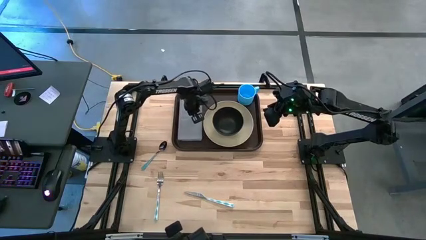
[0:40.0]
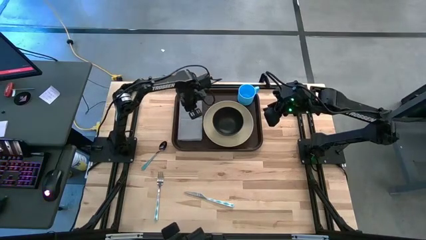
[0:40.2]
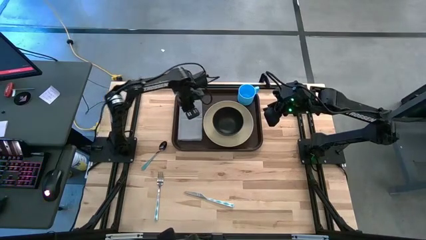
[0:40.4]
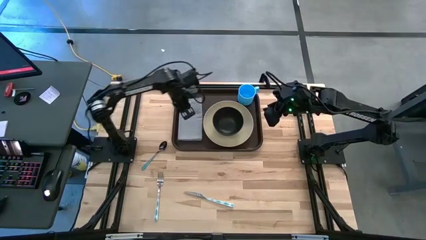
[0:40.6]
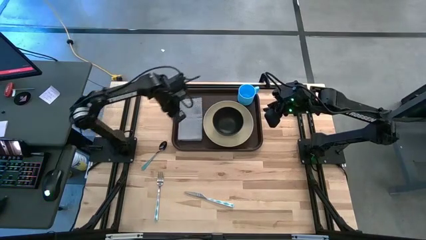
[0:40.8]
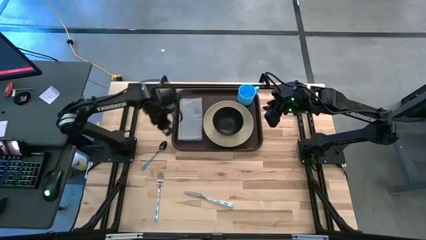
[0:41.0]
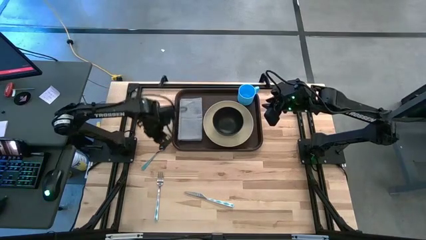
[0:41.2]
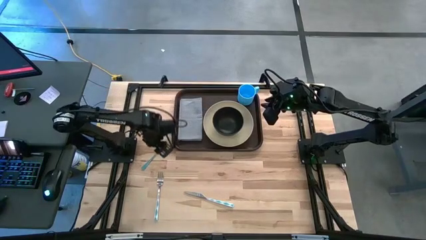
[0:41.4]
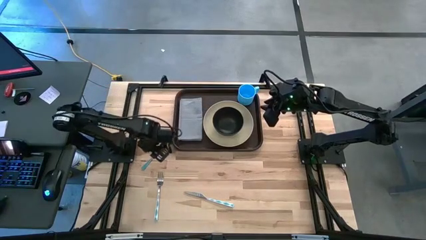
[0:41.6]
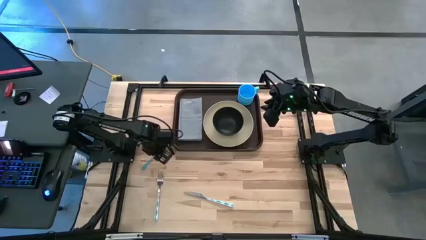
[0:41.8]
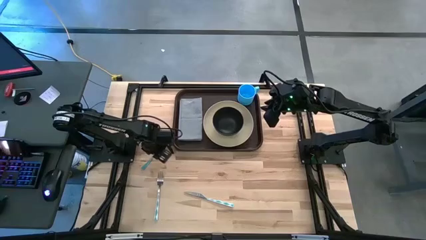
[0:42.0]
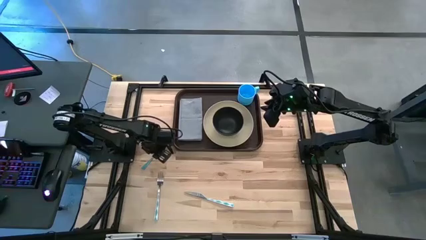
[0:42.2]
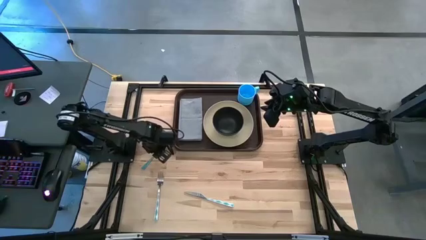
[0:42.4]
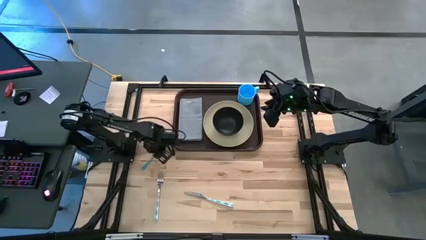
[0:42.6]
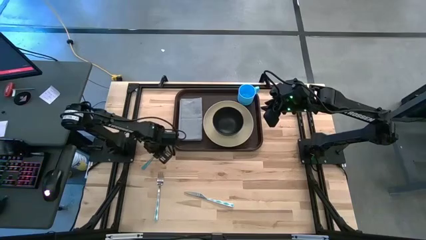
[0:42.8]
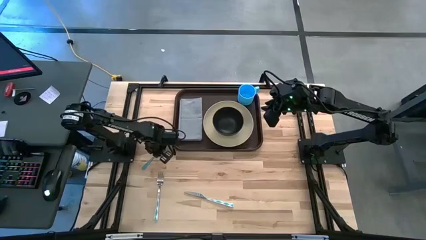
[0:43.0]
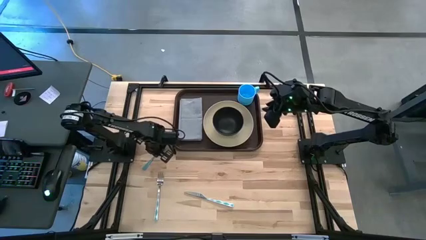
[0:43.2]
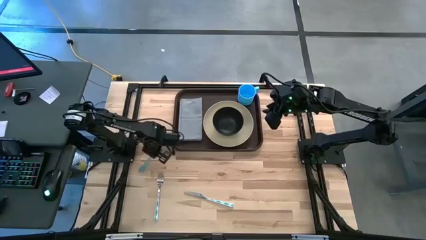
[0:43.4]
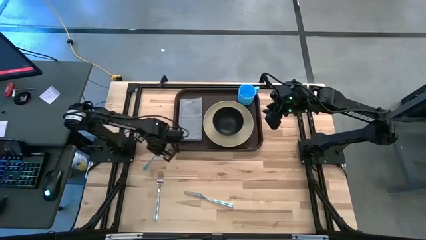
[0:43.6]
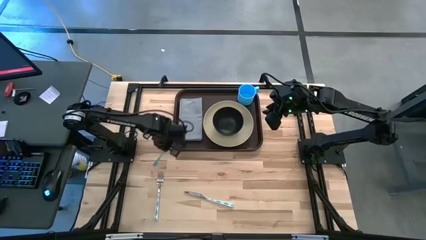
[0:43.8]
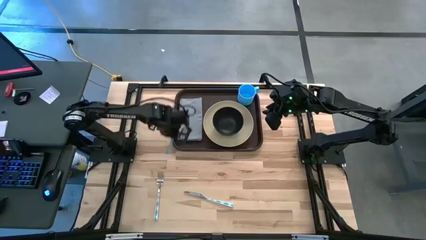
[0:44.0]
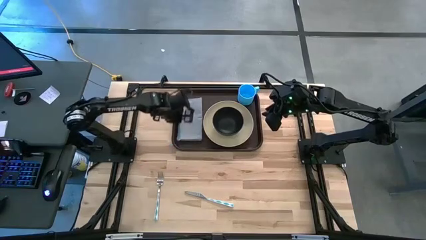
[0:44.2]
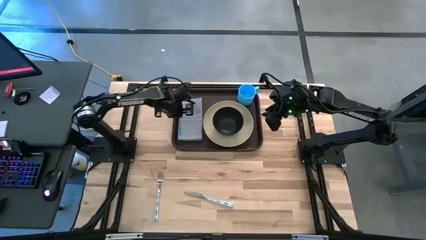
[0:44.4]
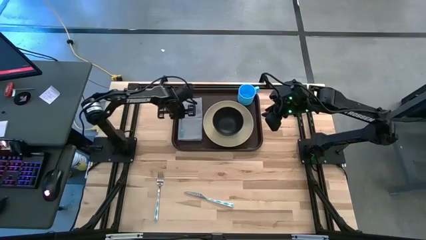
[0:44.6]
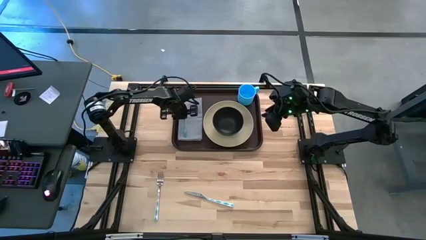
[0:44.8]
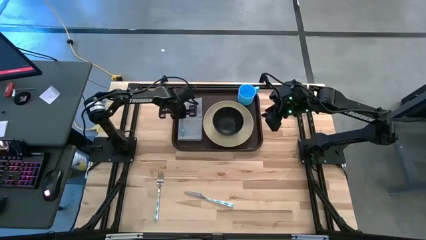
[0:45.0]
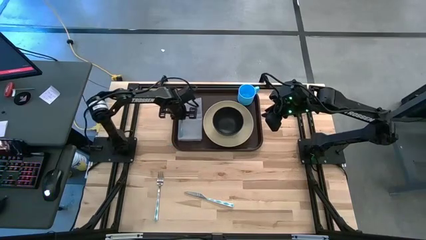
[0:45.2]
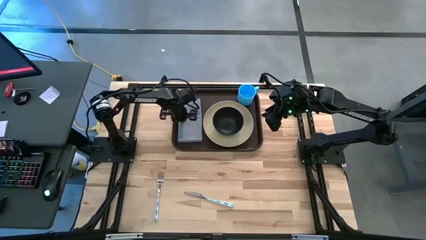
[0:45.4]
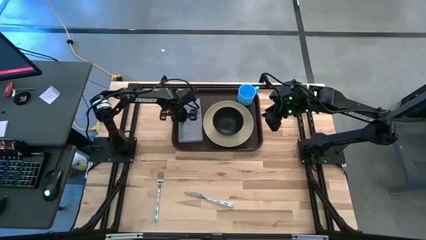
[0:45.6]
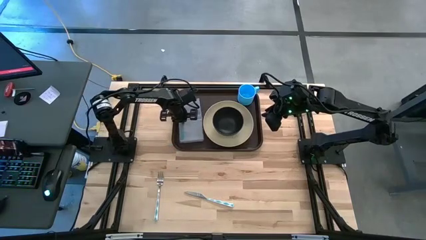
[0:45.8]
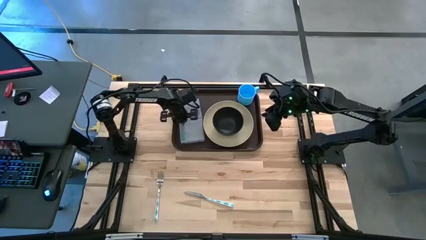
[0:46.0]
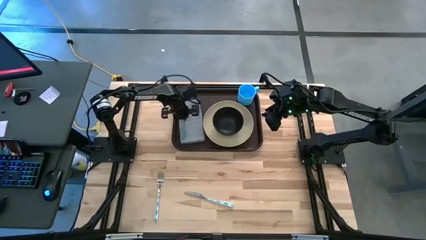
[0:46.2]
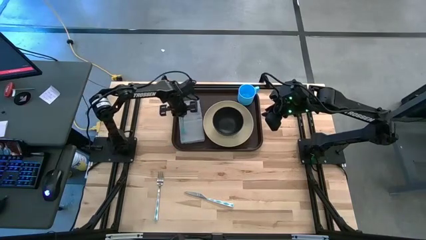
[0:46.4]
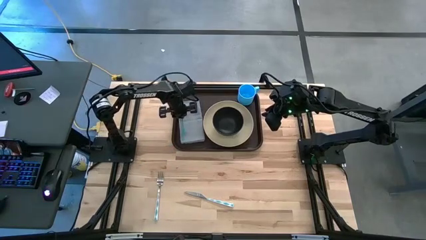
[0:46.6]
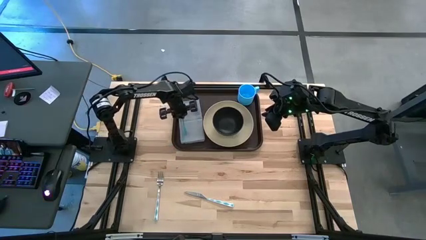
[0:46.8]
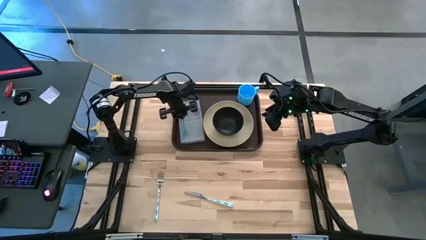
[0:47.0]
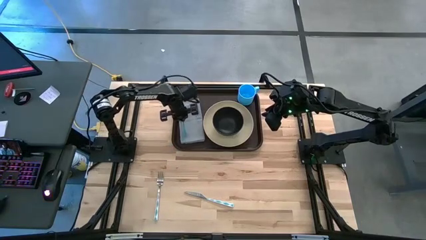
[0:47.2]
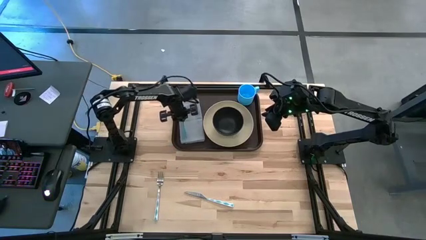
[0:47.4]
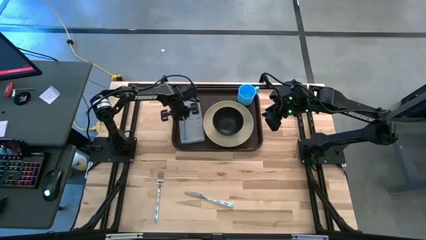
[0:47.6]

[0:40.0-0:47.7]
Task: Set up tray
Put the blue spoon on the gray napkin to the left of the white plate

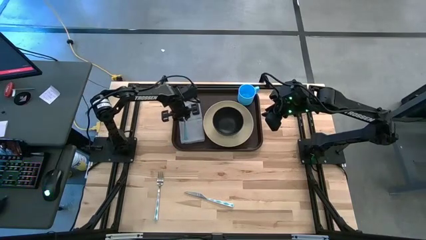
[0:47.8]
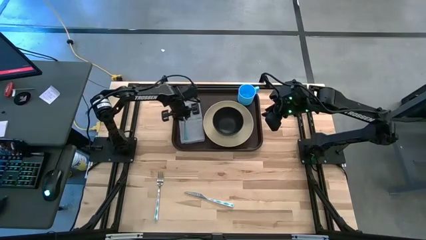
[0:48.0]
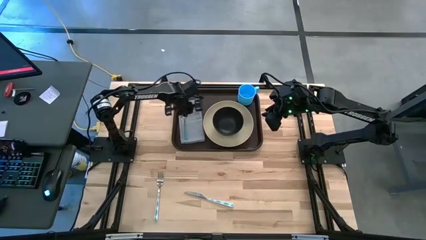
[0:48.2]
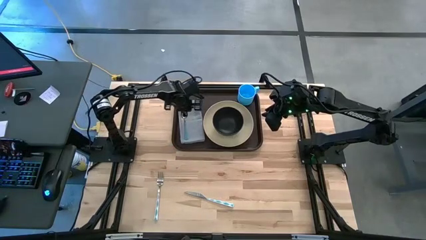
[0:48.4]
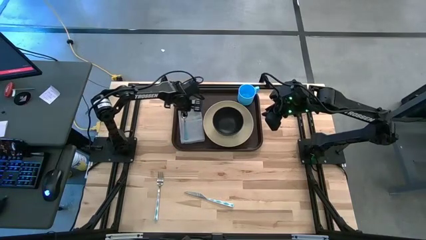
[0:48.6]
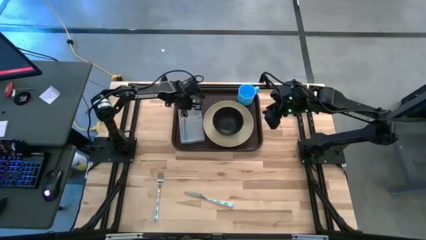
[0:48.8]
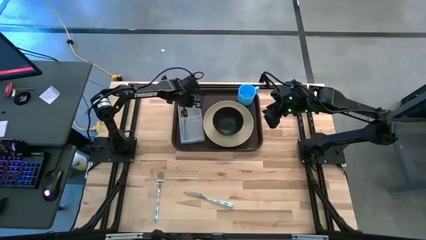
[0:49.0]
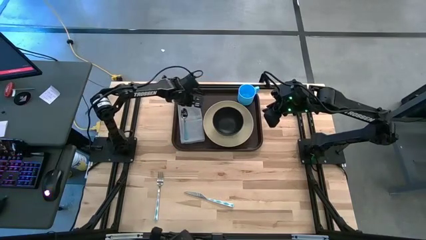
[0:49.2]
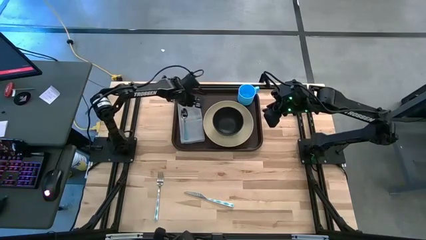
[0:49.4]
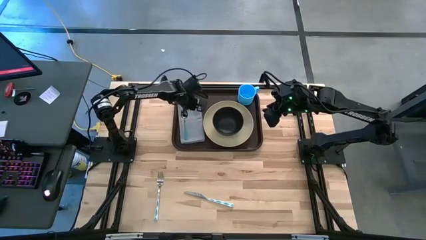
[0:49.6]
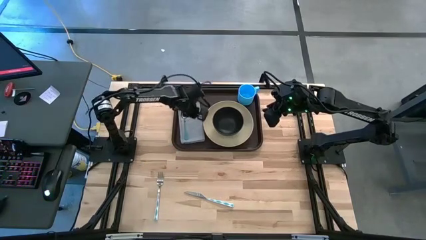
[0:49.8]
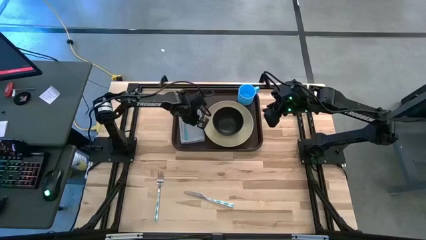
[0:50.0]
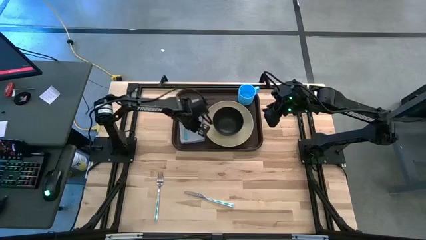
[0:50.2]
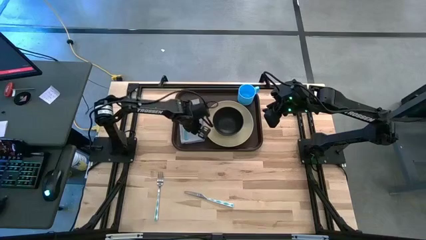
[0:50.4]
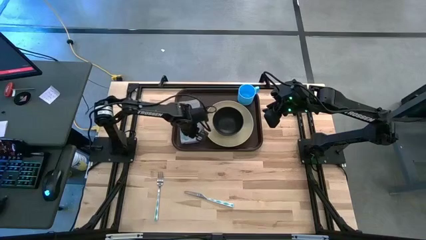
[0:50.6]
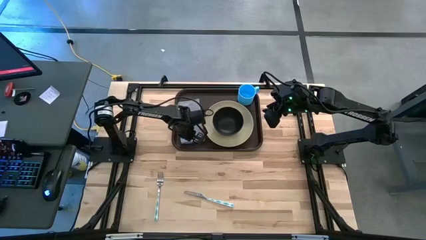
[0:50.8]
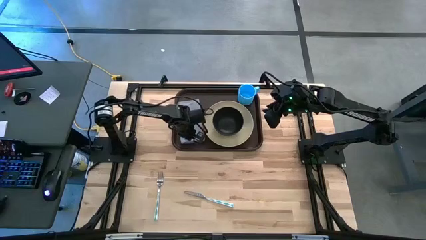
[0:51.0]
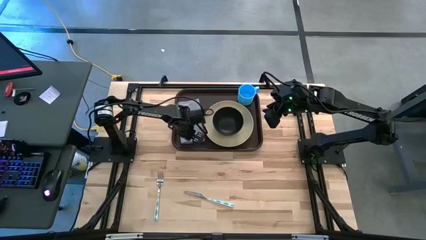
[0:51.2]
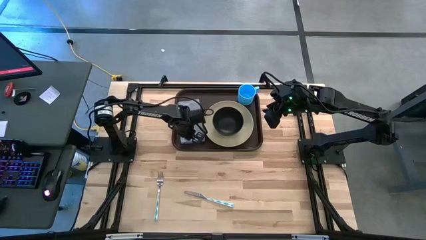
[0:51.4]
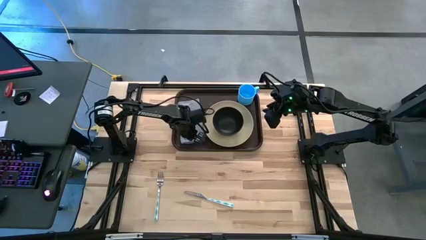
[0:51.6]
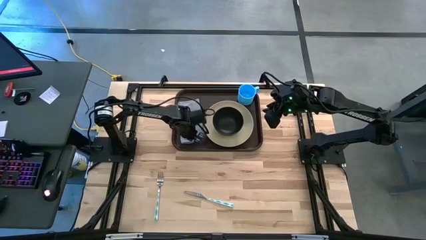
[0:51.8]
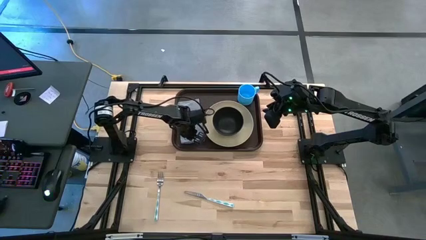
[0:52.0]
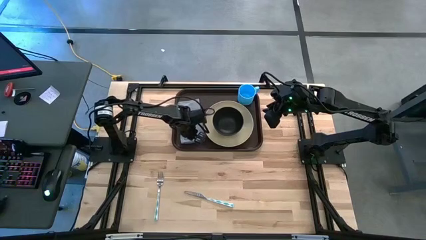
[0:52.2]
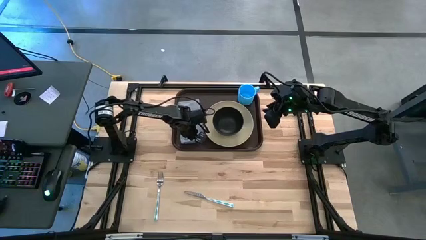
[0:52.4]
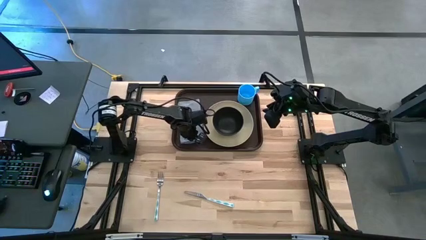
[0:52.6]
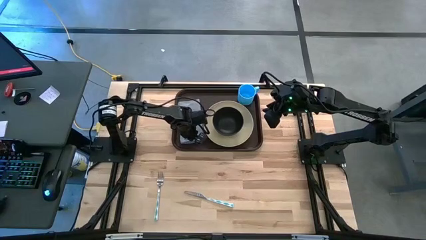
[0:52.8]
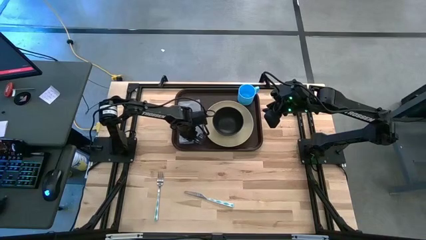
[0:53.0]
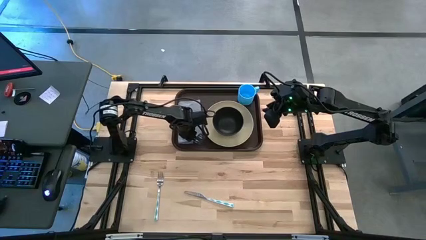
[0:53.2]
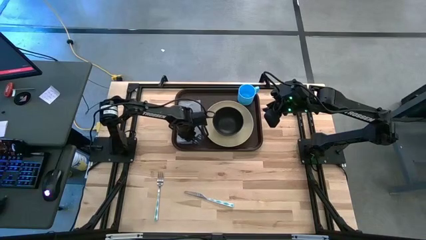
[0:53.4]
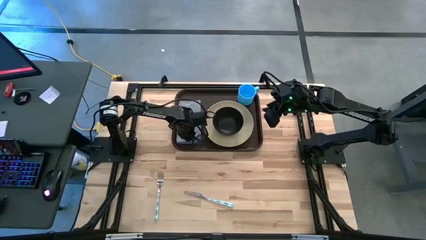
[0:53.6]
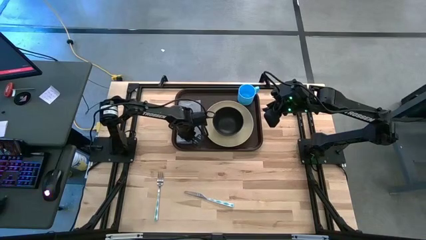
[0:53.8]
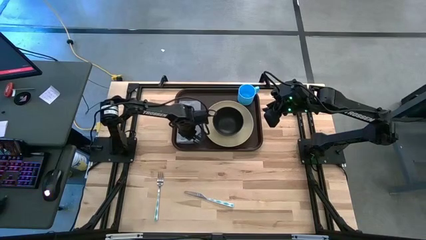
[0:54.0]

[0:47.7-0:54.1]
Adjust the gray napkin on the brown tray

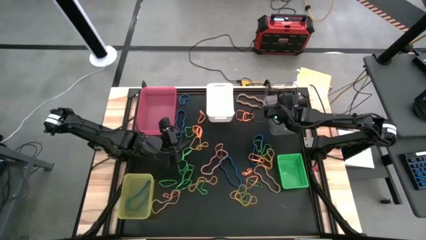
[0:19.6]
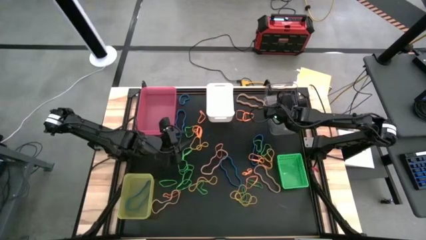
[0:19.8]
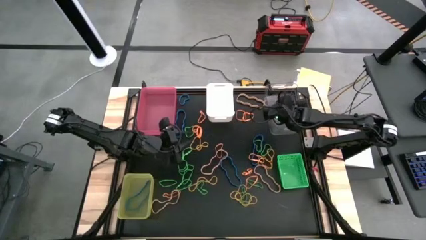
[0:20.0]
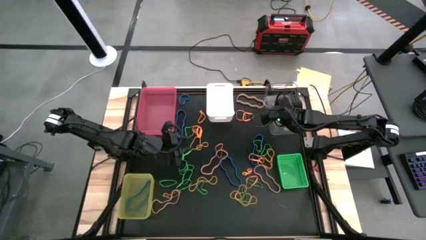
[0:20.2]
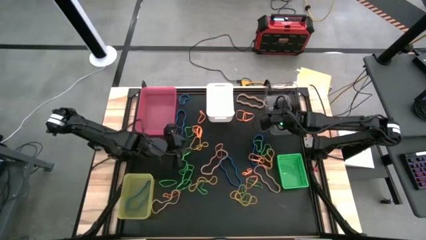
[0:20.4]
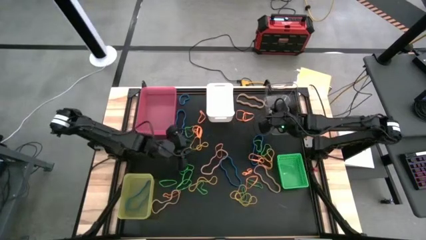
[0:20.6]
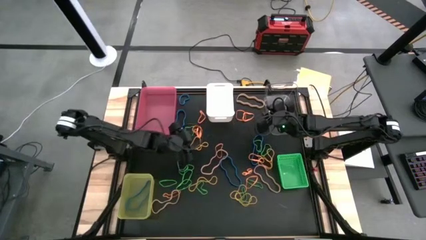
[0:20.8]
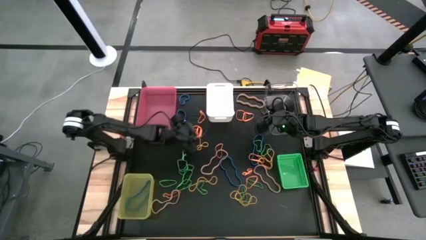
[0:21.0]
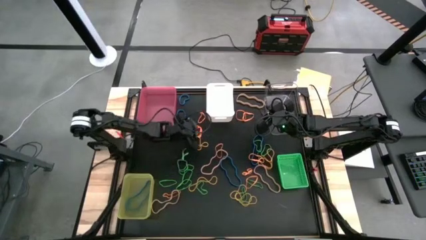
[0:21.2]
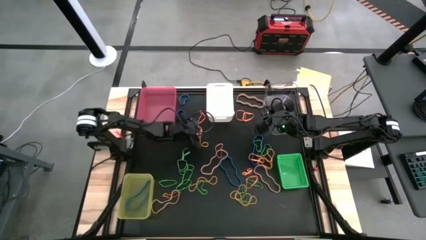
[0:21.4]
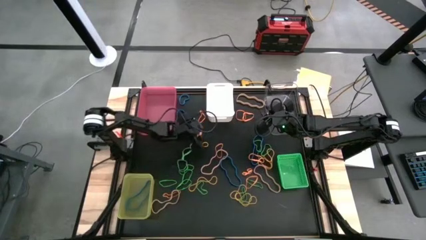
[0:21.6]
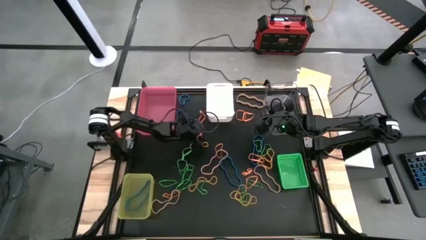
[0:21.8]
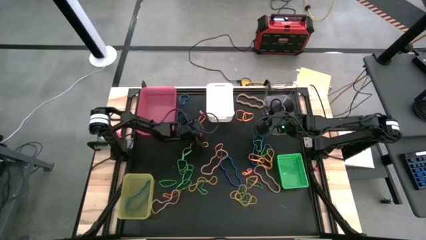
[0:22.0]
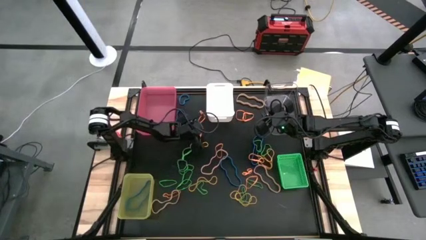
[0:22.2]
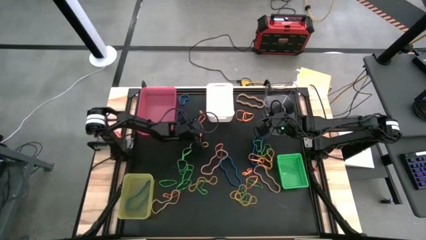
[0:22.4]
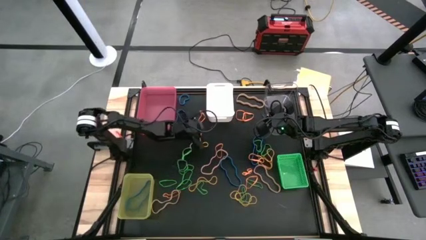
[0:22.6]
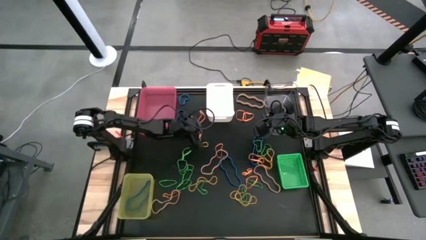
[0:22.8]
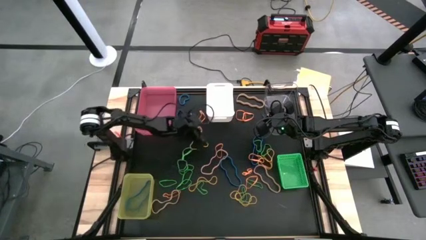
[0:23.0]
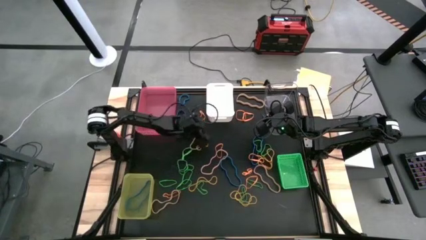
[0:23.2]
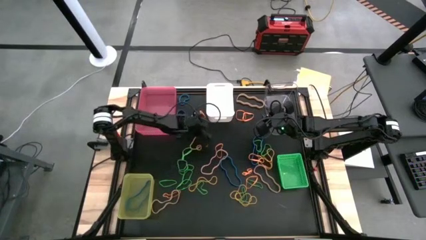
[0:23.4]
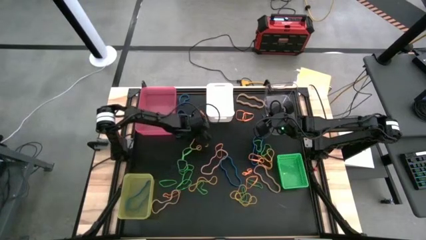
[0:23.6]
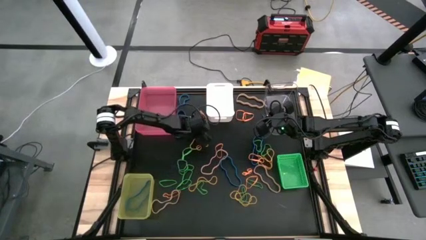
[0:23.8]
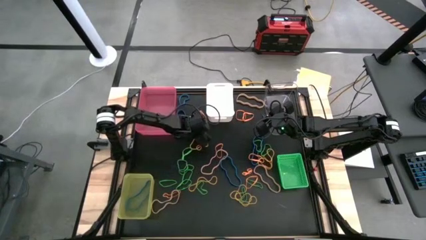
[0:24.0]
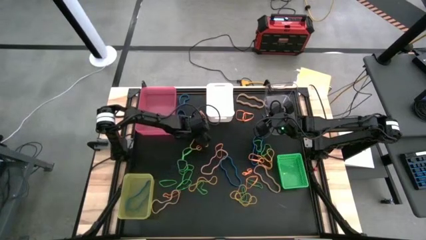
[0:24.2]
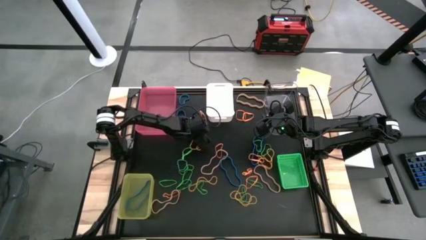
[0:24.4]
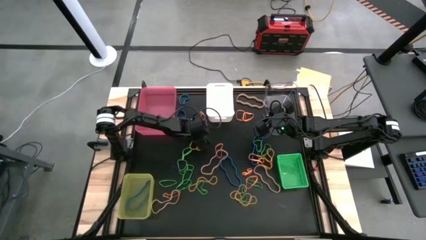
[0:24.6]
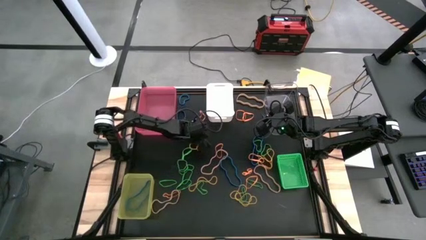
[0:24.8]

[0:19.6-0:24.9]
Task: Sort rubber bands into baskets
Put the orange rubber band into the pink bin
